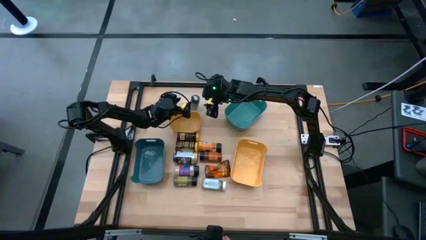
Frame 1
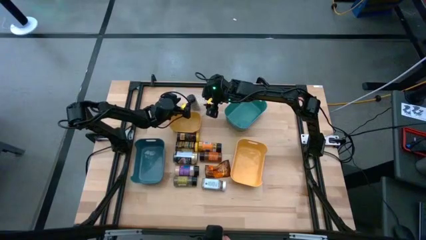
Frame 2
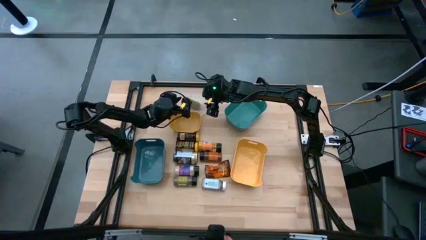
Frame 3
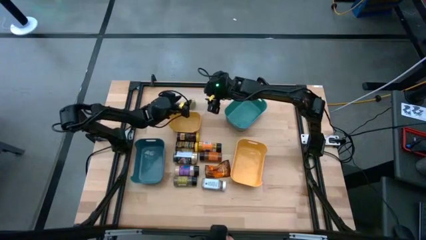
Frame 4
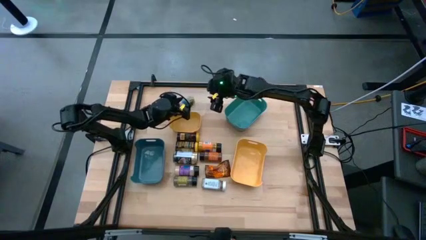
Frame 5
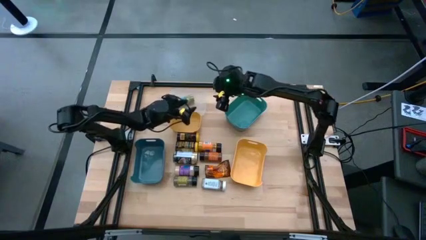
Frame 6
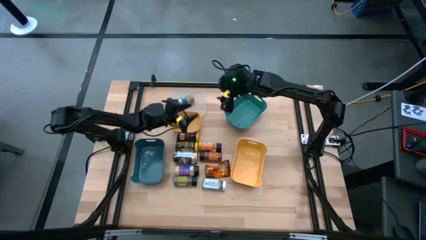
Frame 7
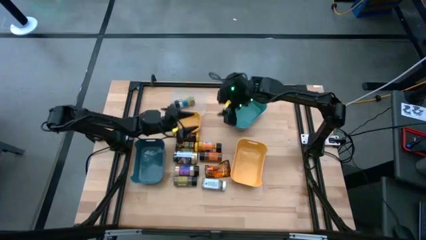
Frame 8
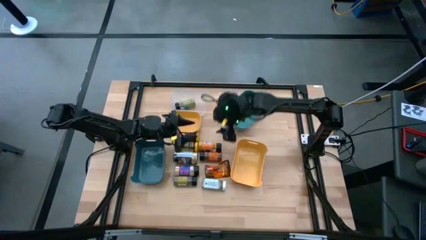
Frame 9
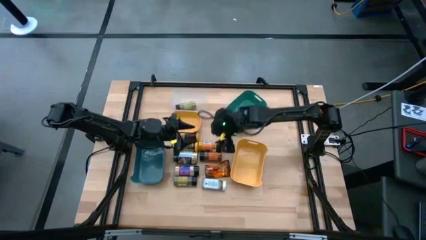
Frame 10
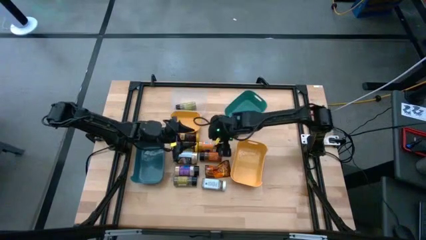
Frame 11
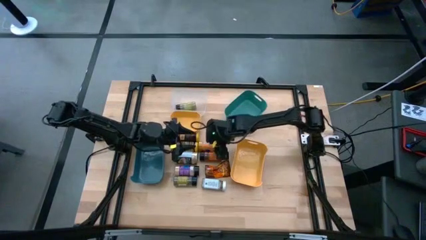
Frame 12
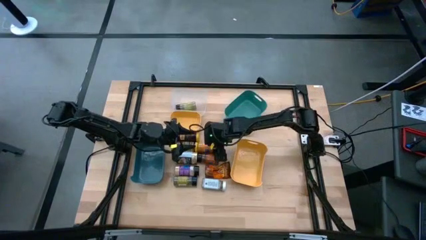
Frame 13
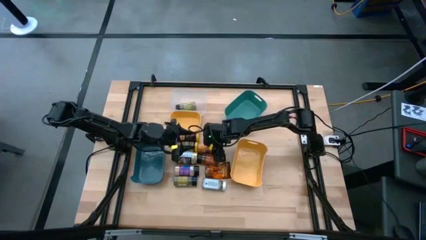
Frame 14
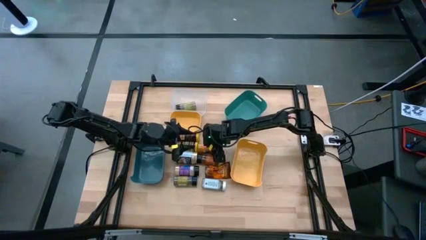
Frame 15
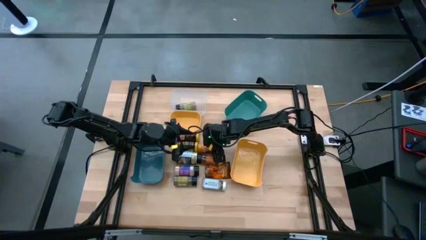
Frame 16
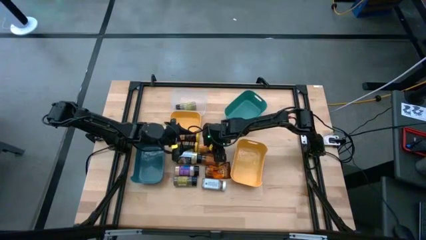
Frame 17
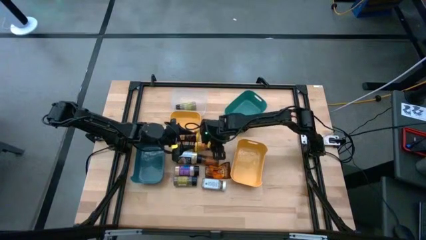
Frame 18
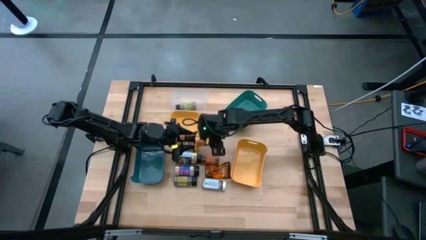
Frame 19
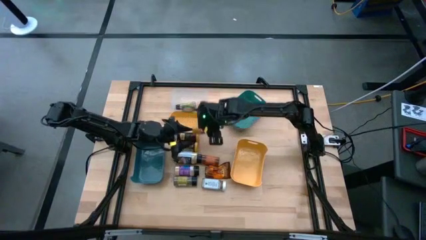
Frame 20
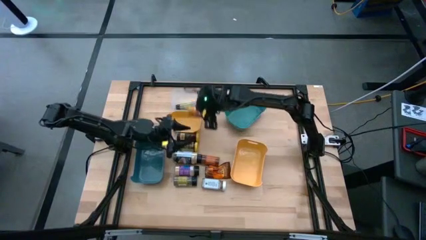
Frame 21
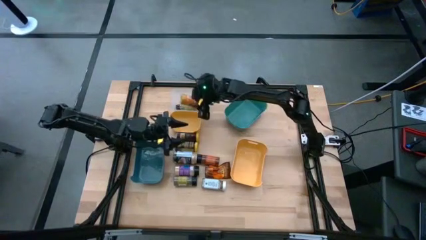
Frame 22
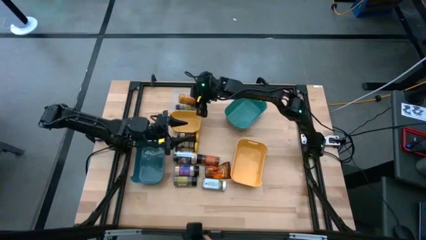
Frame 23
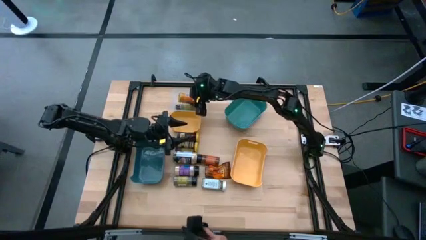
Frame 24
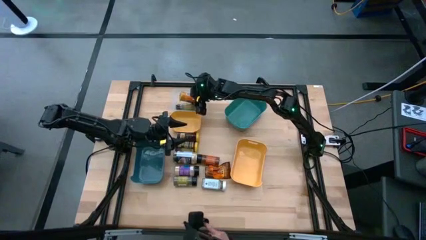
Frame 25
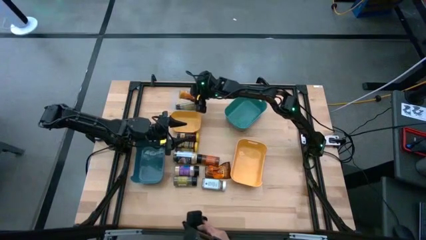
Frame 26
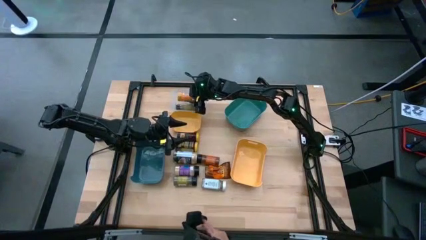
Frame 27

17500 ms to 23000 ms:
Task: Sort spices by type
Put the black seasoning bottle into the transparent bin

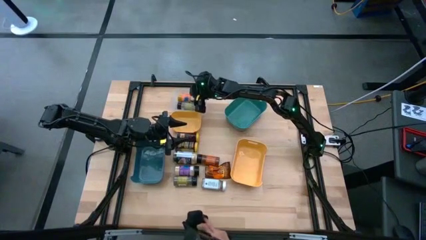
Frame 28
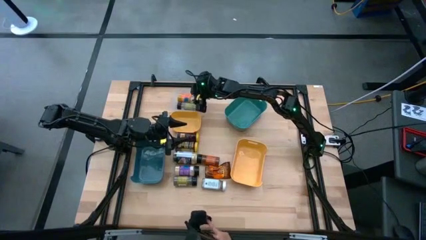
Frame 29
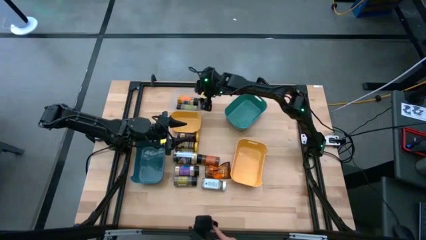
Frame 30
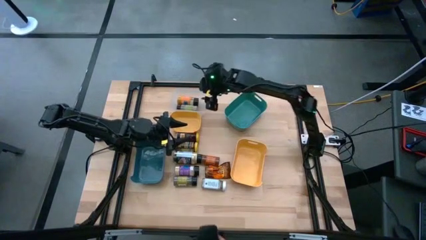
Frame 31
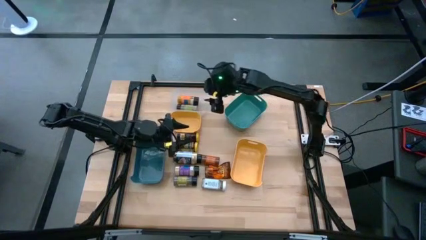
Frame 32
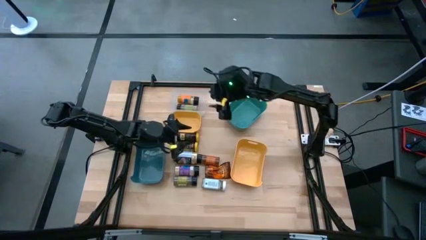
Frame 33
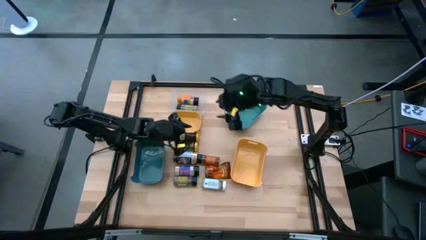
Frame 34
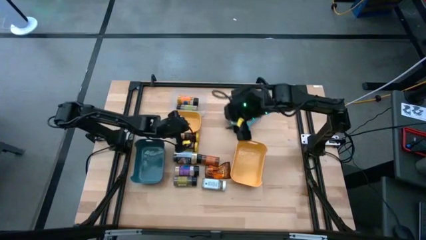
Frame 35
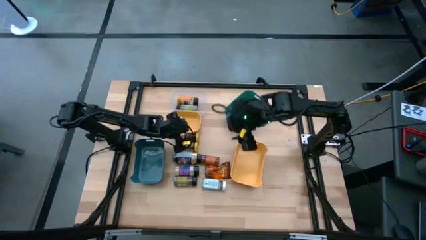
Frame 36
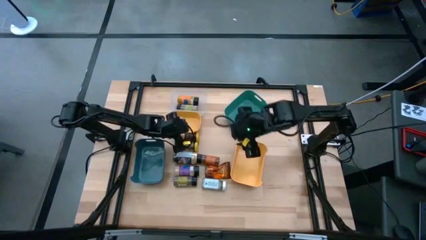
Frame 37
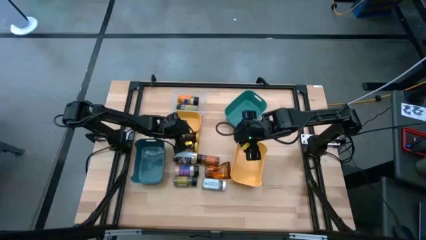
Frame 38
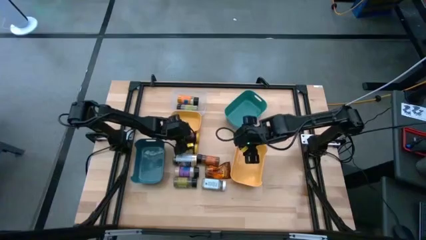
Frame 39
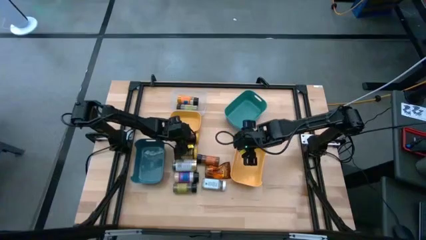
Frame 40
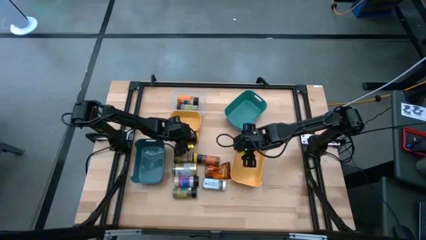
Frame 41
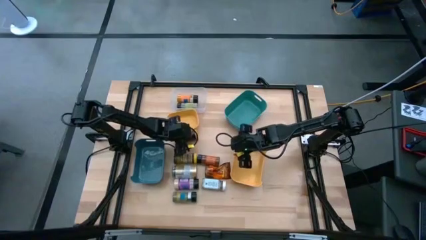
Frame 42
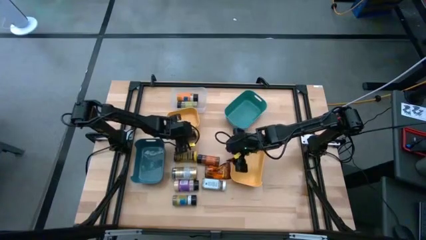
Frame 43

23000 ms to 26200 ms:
Put the yellow seasoning can into the top yellow bin

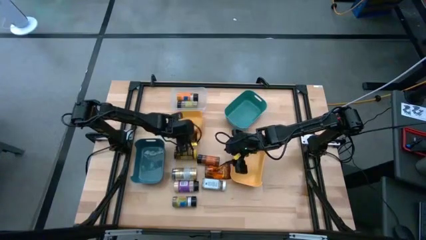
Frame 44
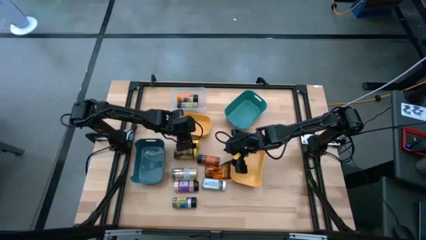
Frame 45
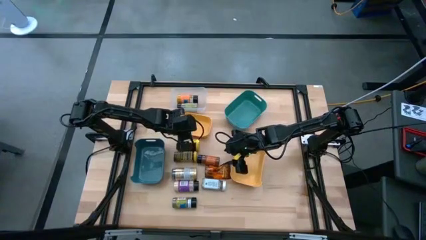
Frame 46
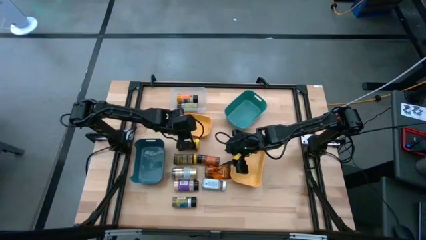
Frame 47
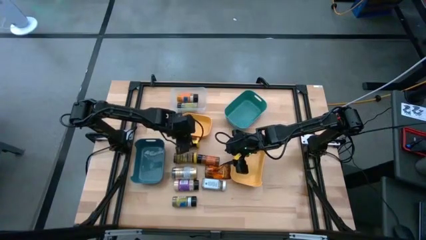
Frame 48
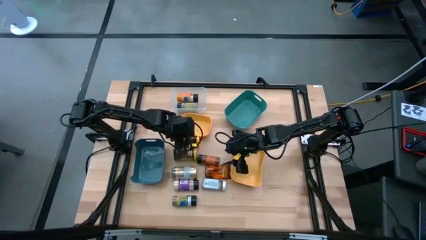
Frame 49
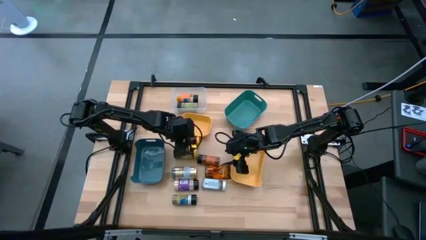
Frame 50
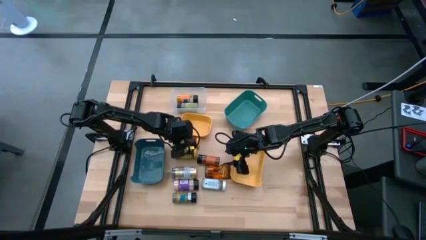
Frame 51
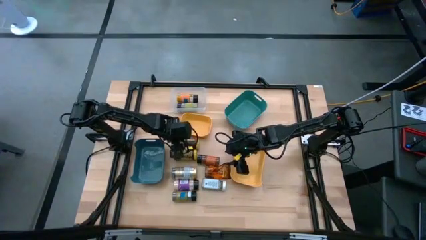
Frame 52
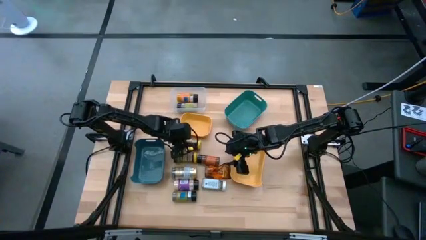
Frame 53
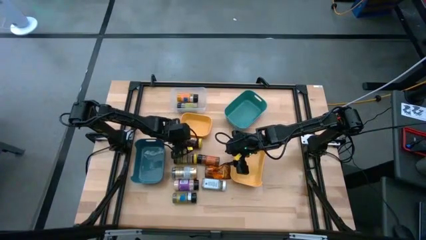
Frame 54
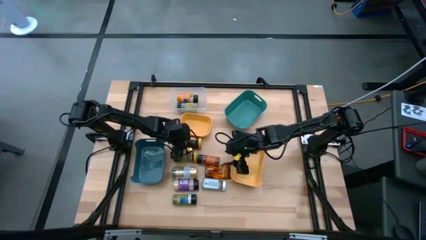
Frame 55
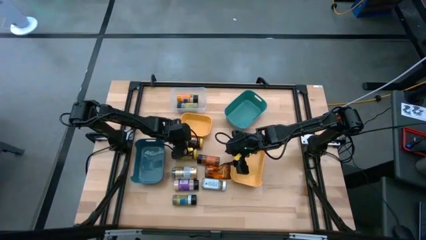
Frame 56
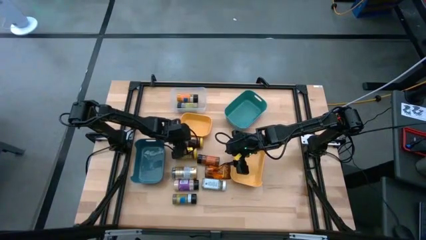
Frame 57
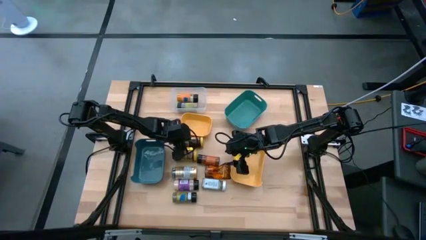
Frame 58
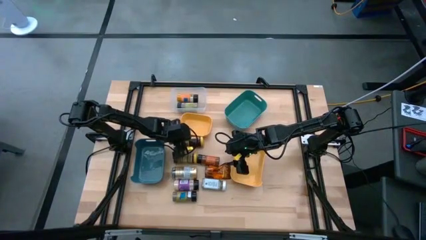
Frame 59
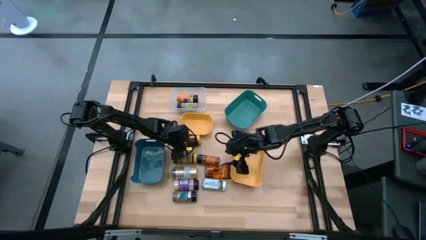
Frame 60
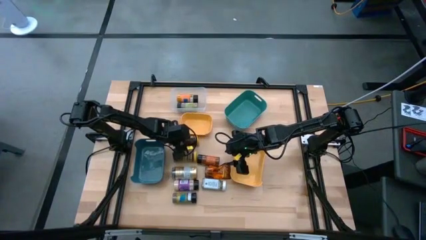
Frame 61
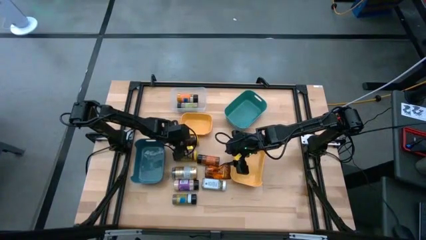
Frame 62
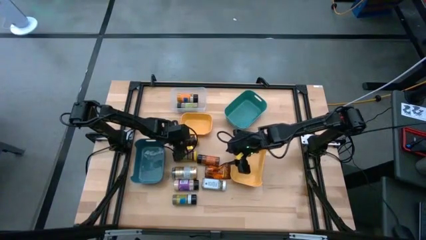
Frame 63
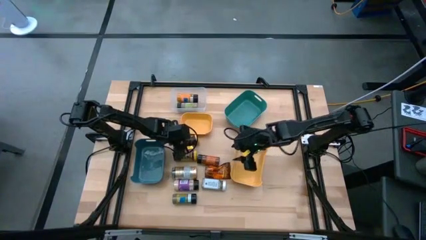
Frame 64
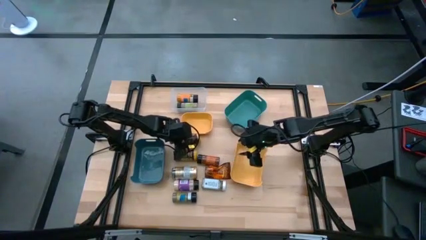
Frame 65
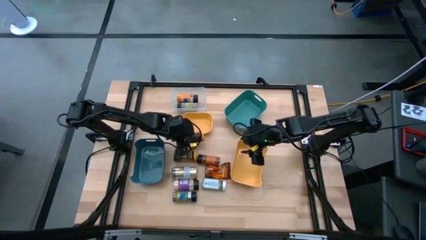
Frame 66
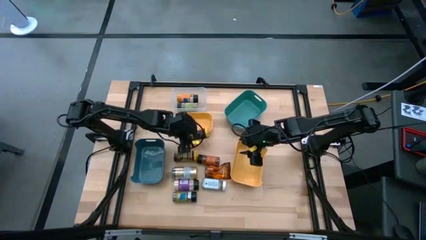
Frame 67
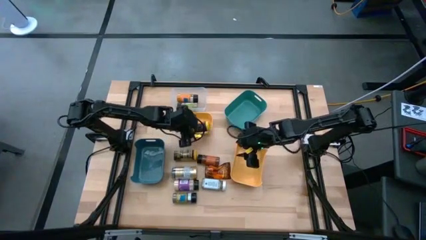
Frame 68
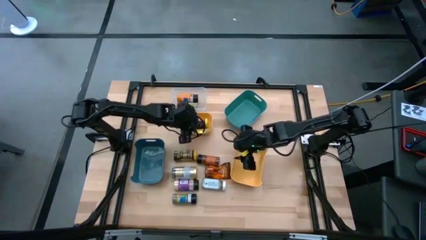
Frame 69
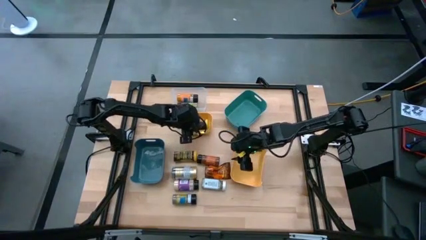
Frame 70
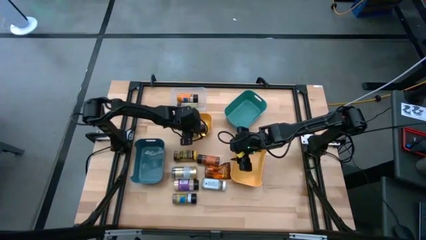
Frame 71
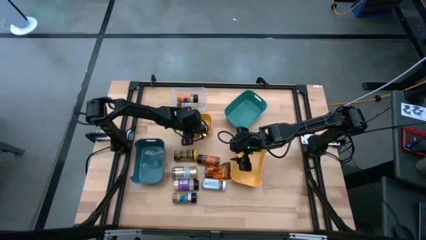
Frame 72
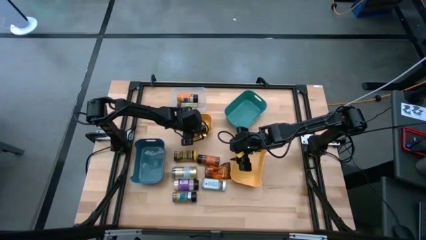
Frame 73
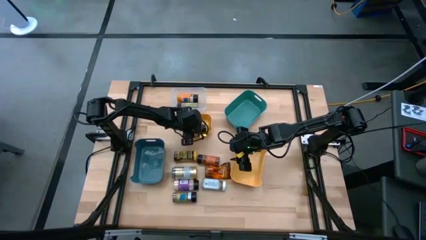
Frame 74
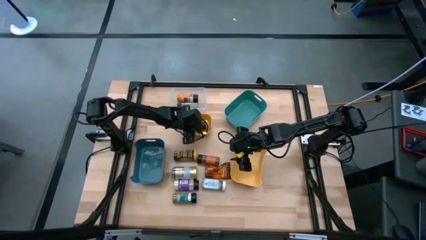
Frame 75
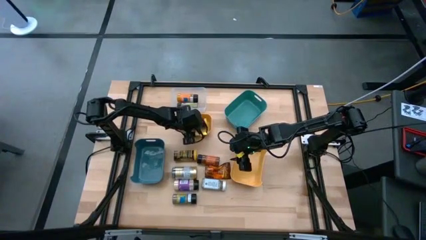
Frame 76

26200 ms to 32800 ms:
Put the yellow seasoning can into the top yellow bin

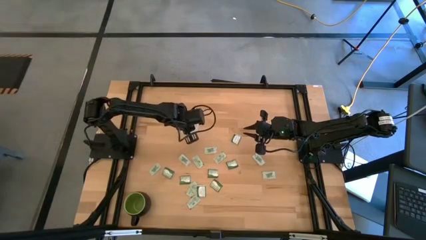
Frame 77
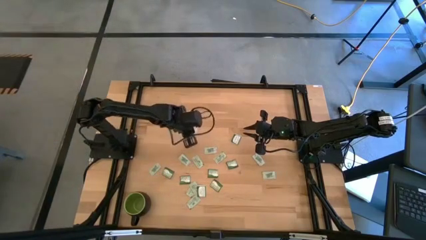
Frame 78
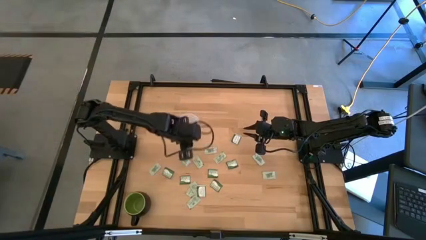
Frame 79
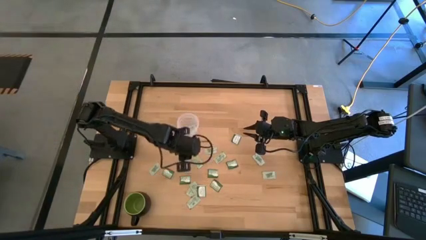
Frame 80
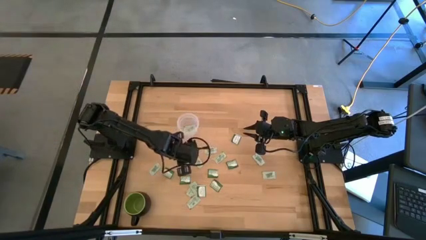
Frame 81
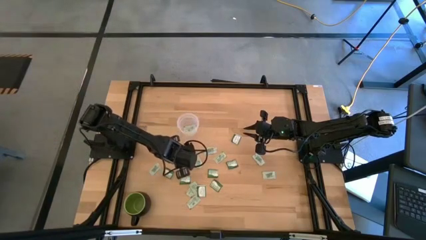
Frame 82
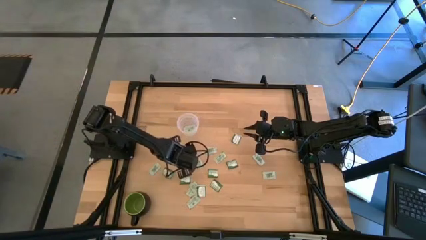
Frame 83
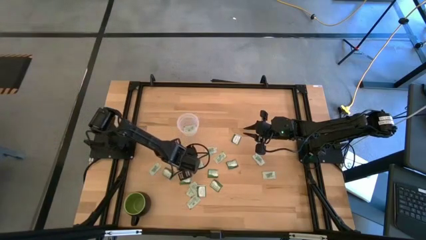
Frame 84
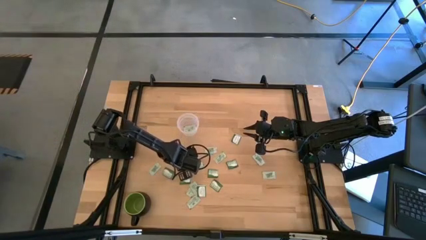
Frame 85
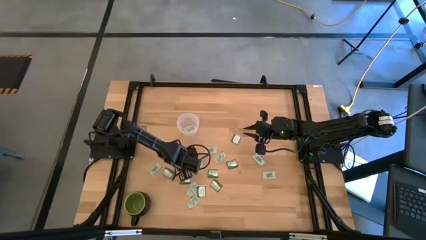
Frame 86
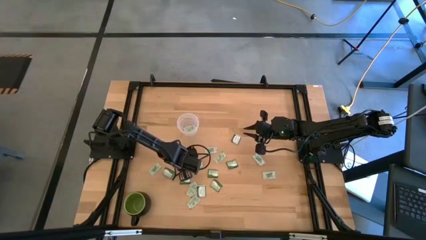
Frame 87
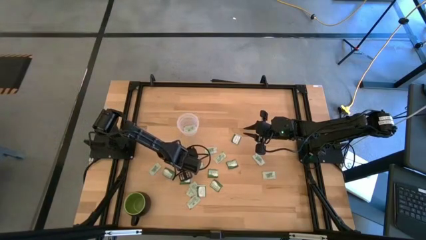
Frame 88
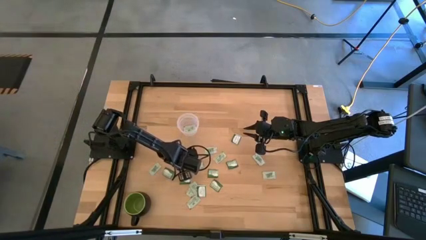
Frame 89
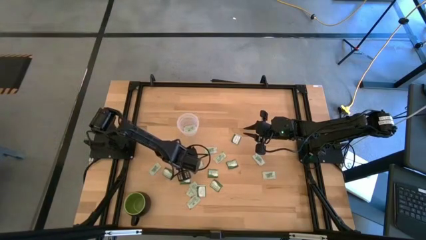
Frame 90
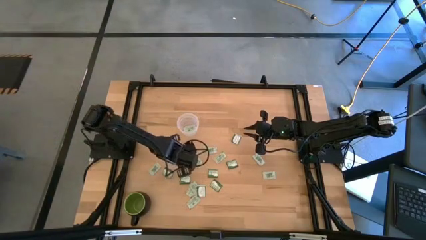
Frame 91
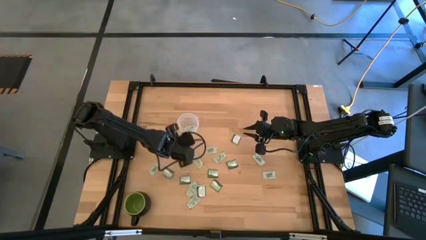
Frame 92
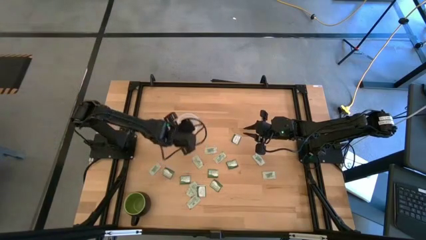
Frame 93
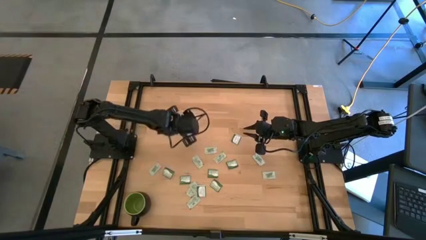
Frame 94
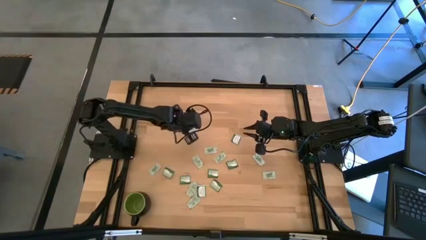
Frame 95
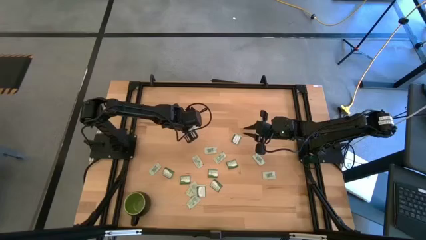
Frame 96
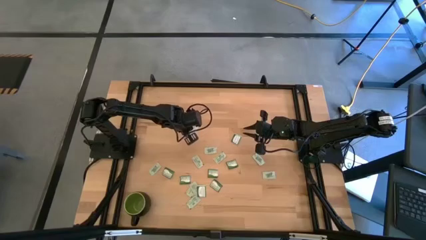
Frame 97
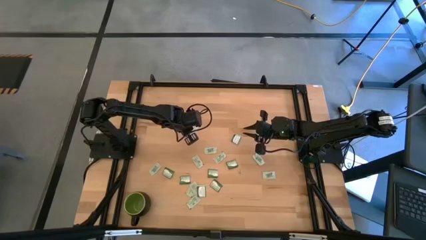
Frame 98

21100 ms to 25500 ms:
Task: Pick and place Stevia / Truvia into bins
Put the light green stevia packet into the transparent container
